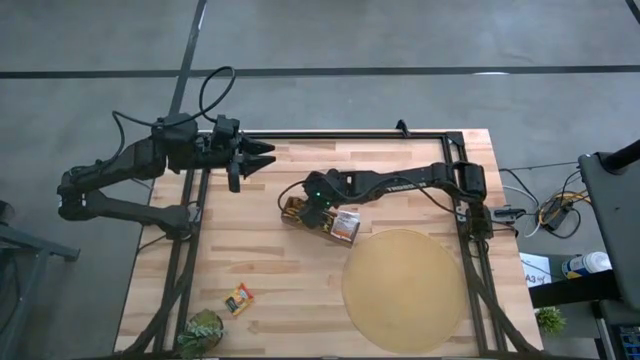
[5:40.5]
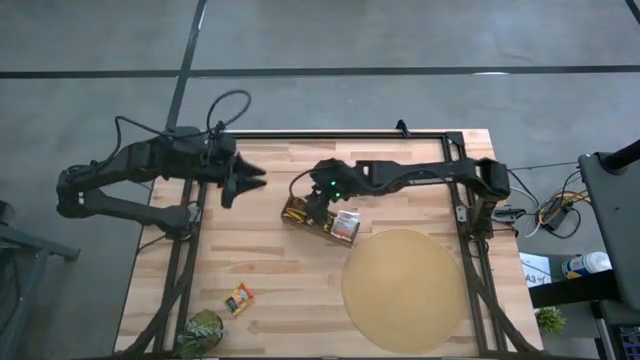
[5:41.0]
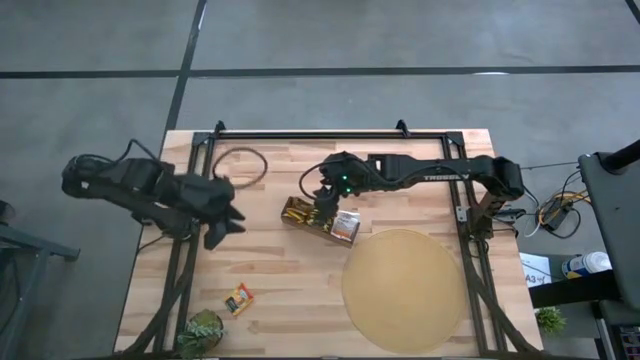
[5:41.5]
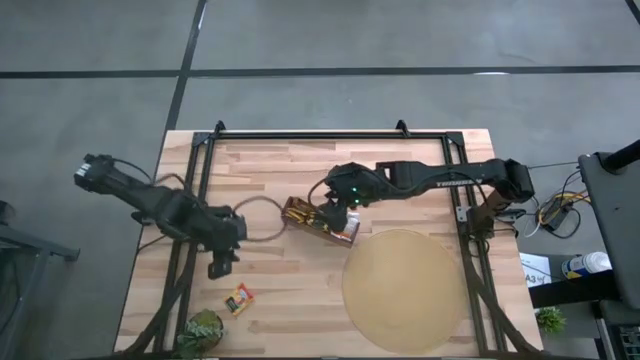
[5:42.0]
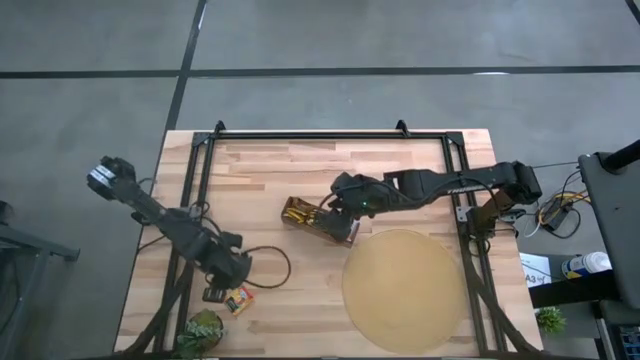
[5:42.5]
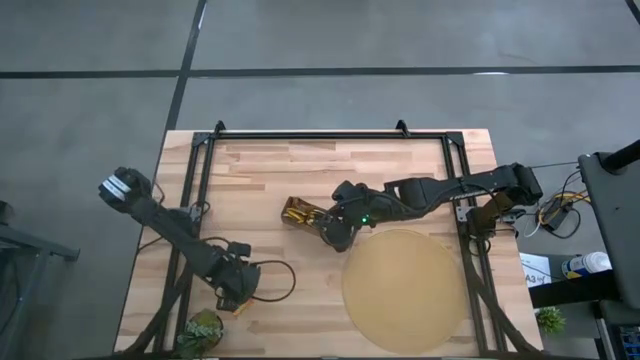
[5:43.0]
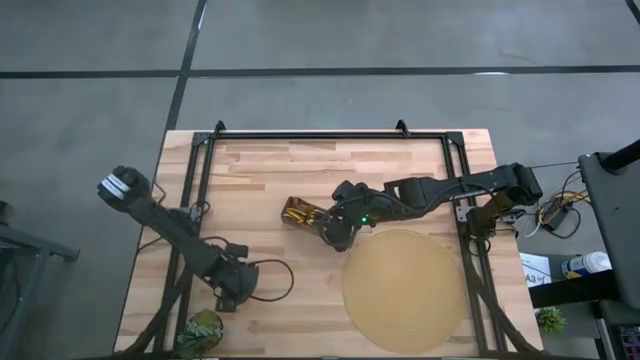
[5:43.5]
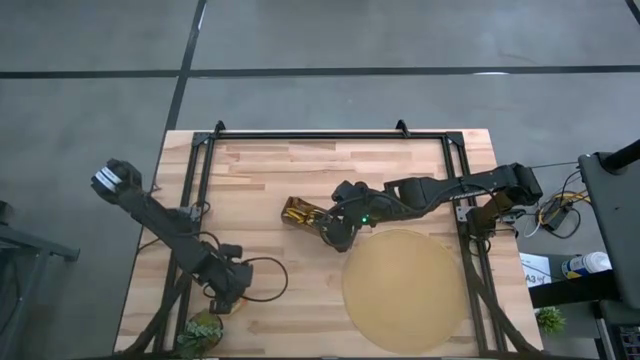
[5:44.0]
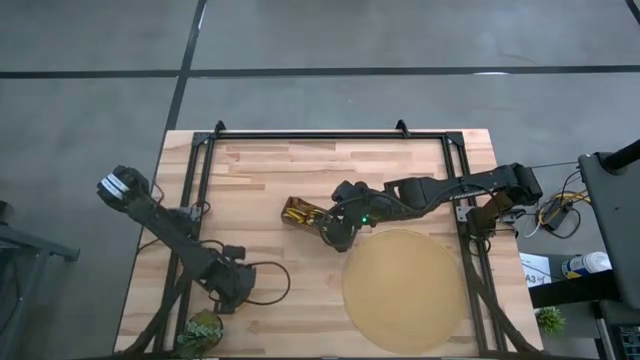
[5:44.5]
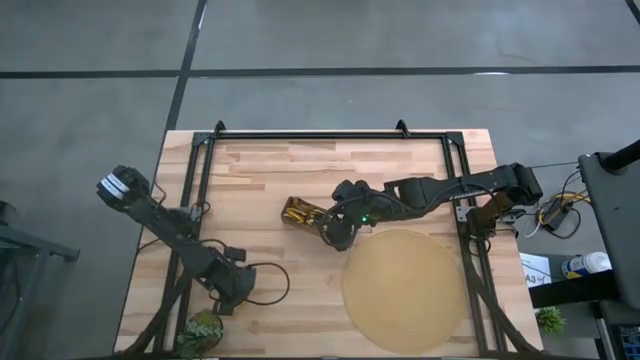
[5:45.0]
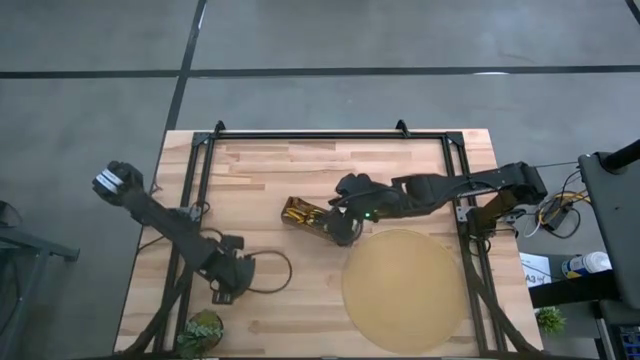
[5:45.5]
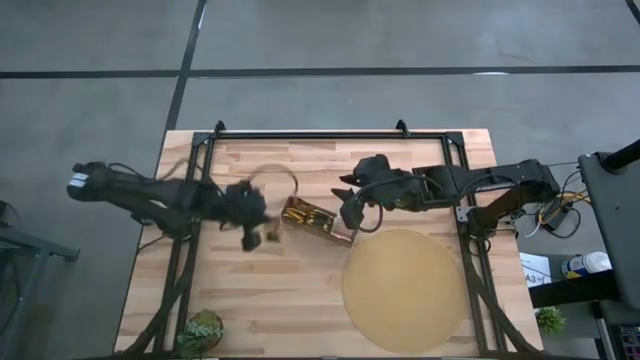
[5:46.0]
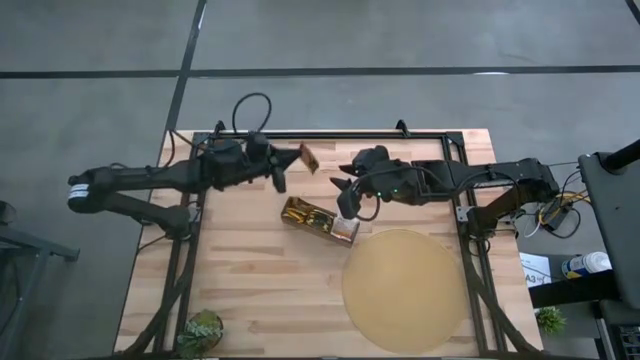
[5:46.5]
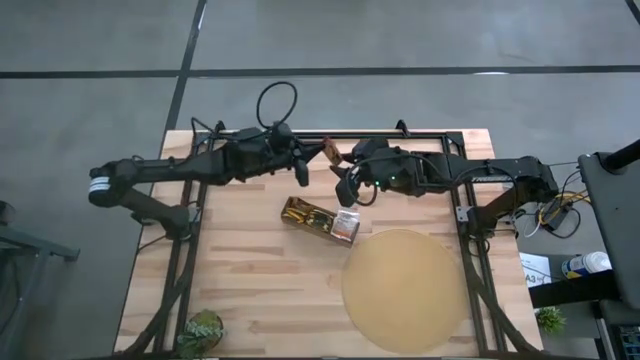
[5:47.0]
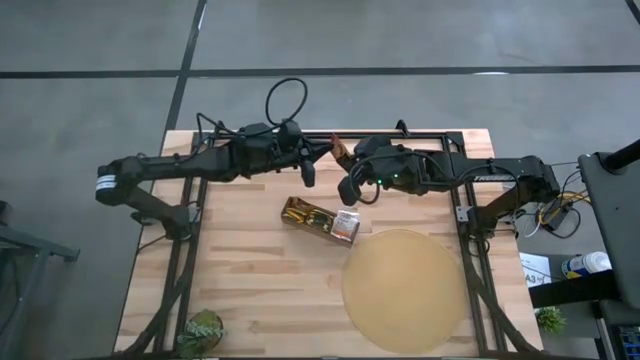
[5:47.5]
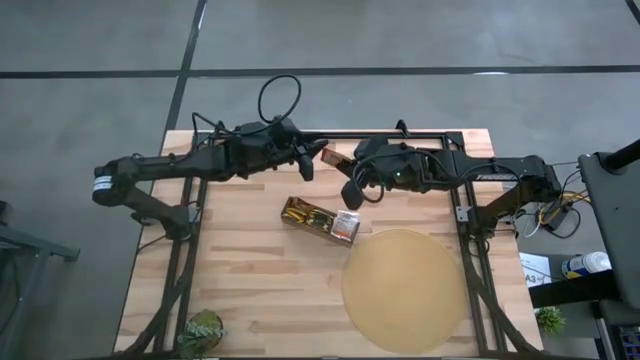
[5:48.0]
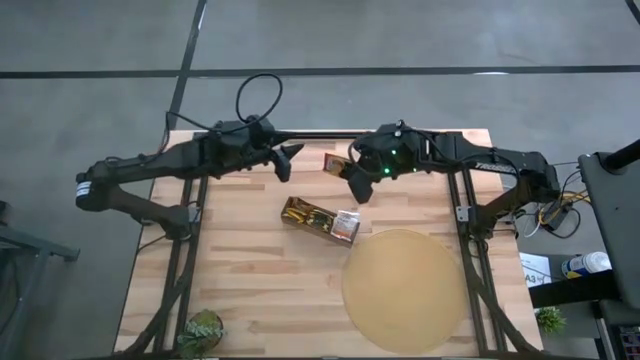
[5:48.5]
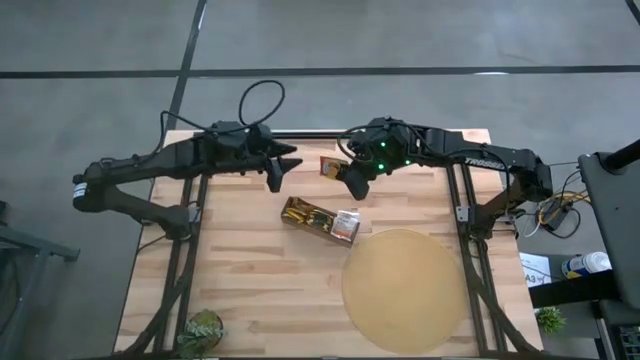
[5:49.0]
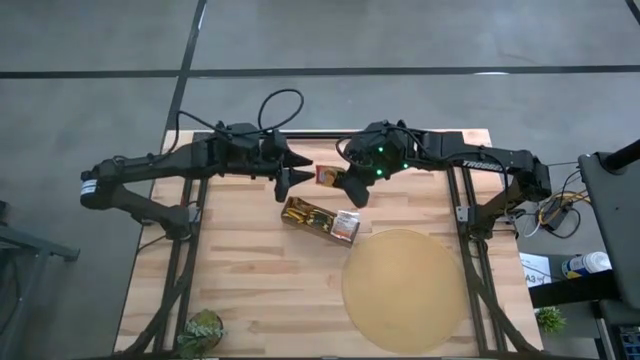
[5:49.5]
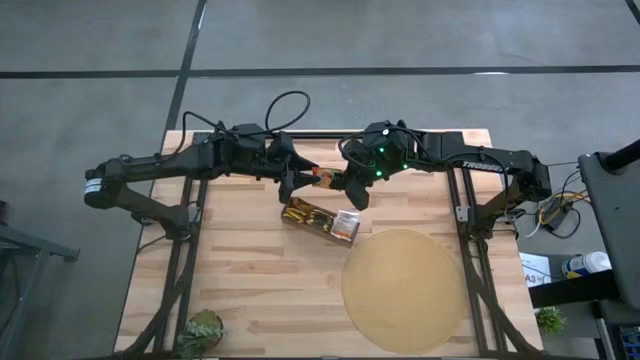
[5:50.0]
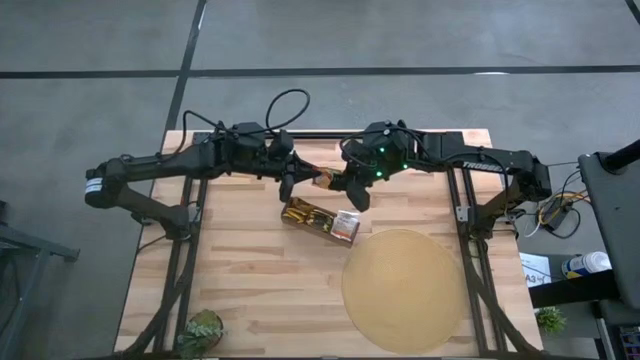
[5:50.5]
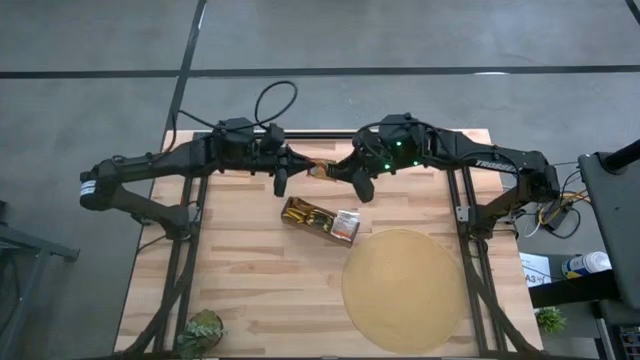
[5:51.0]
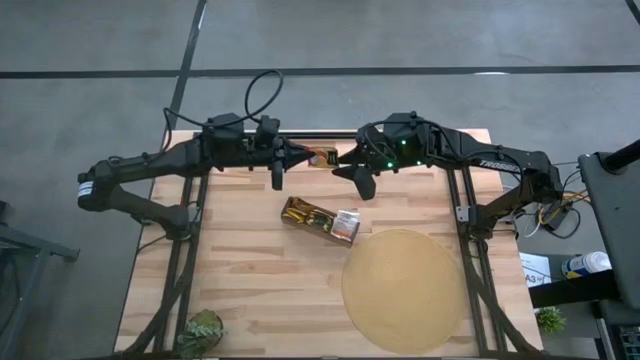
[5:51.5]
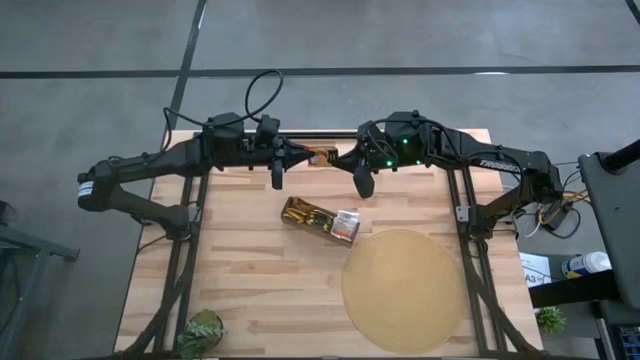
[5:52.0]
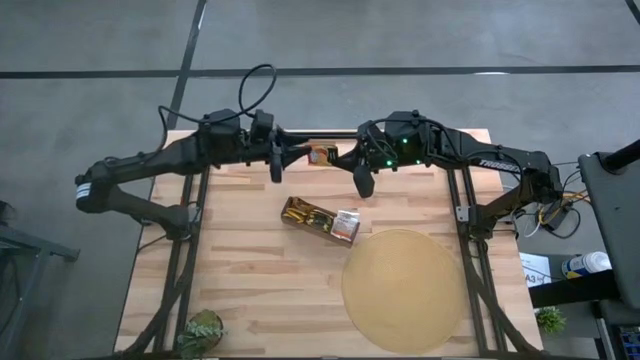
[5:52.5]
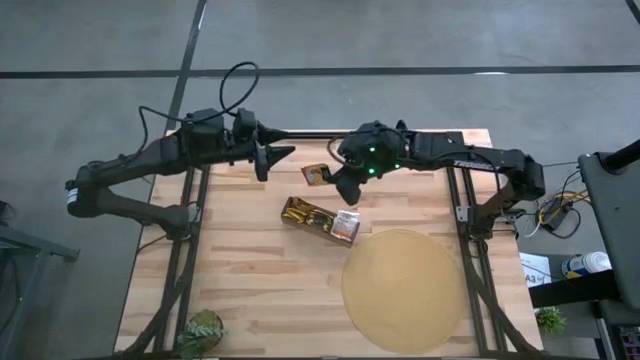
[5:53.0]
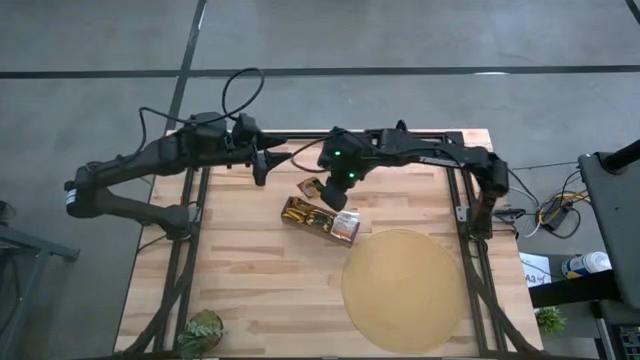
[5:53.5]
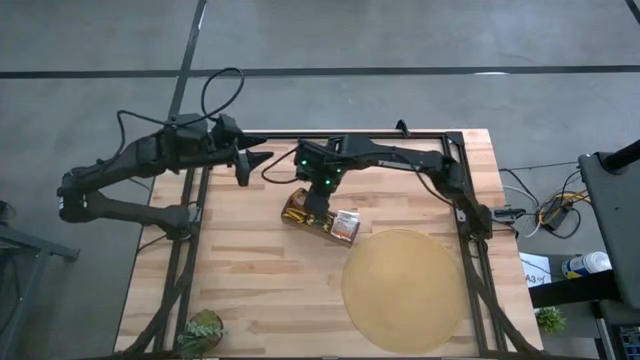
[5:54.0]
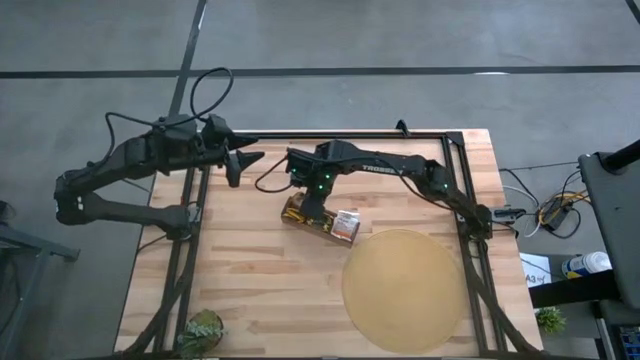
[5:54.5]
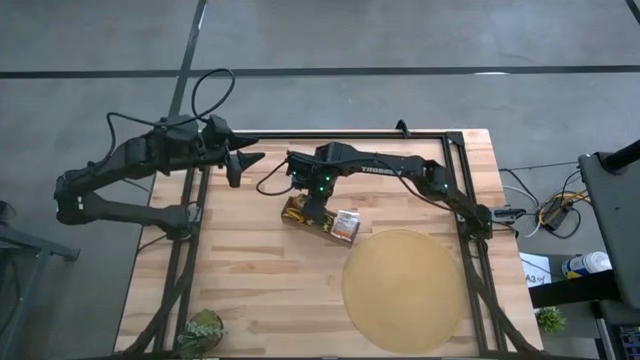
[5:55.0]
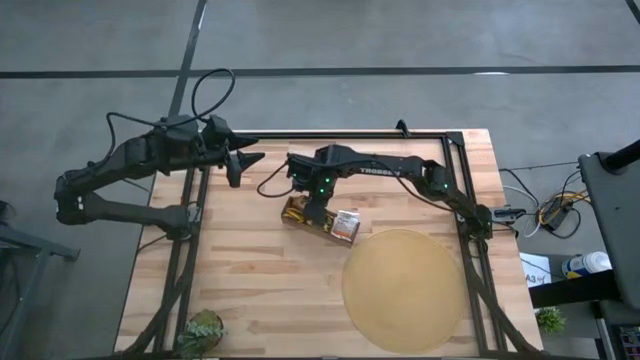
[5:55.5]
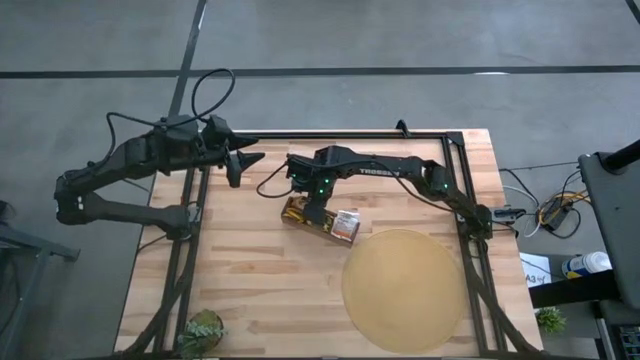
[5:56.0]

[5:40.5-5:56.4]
Task: Pick & Place Tea
Put the orange tea bag into the left section of the wooden organizer

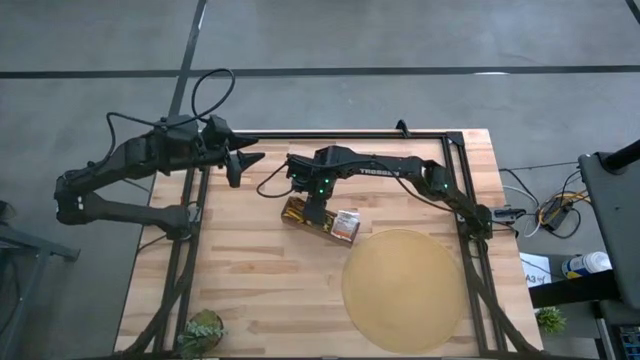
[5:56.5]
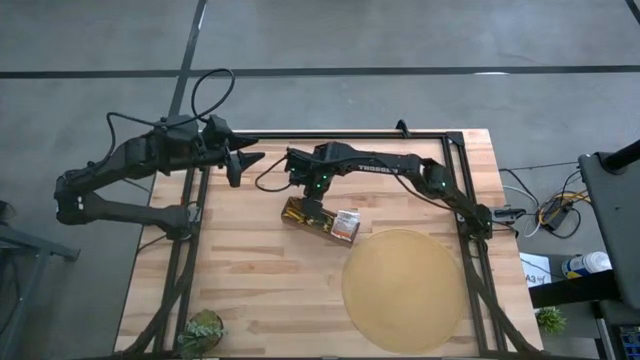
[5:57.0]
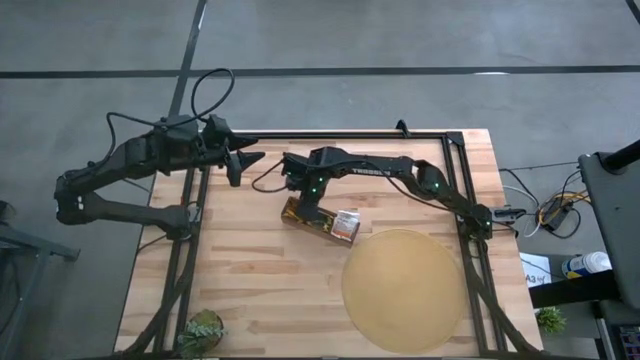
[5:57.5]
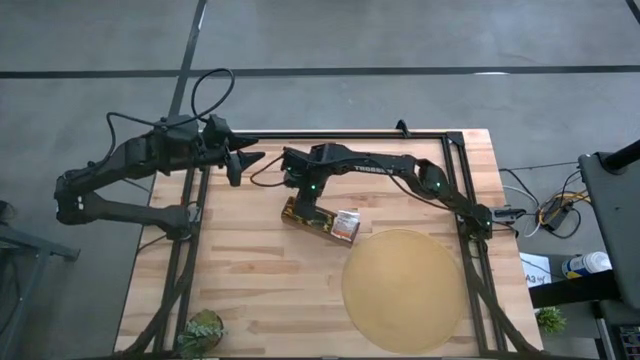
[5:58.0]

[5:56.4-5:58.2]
Adjust the orange tea bags in the wooden organizer

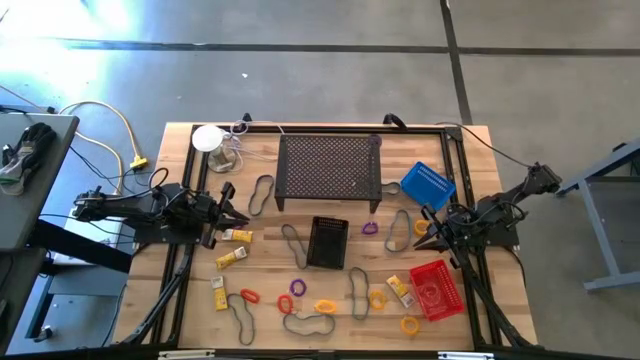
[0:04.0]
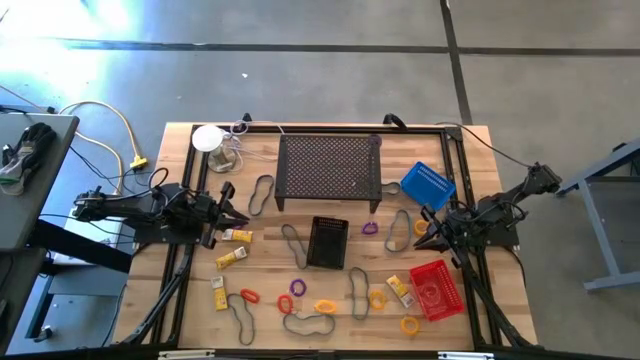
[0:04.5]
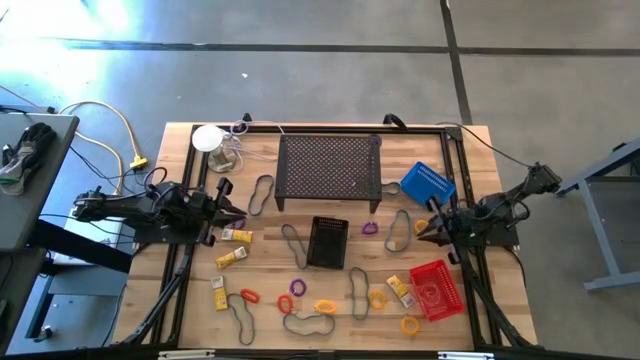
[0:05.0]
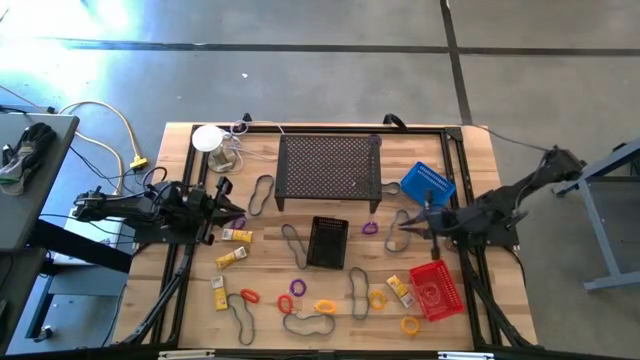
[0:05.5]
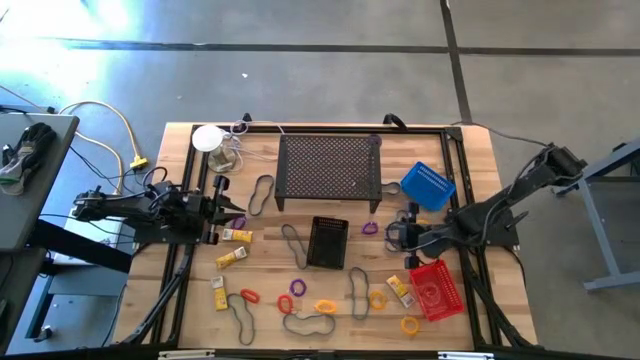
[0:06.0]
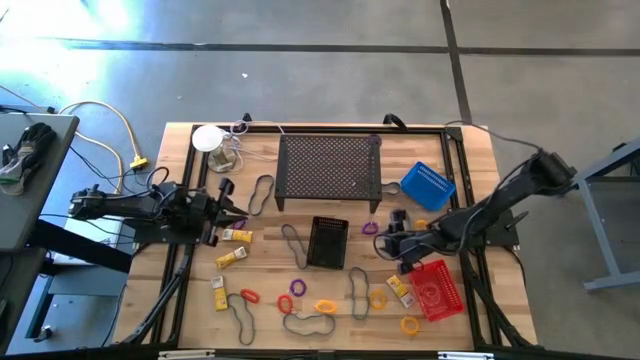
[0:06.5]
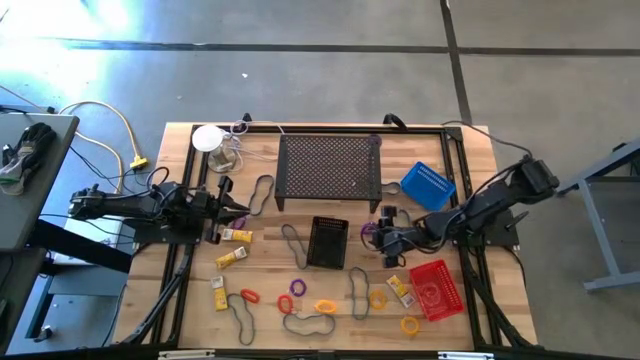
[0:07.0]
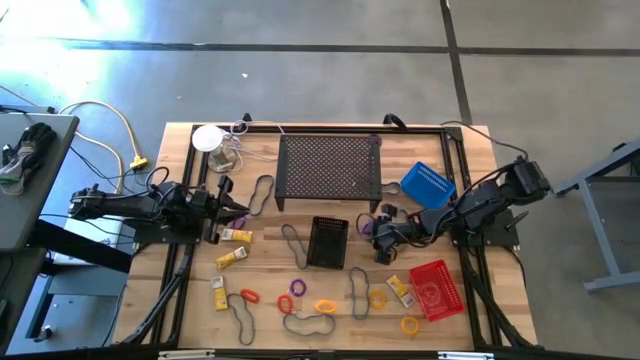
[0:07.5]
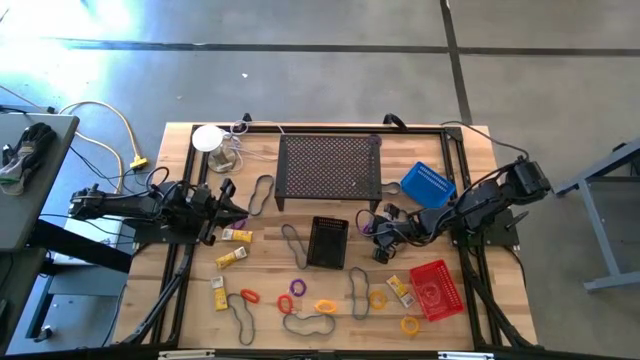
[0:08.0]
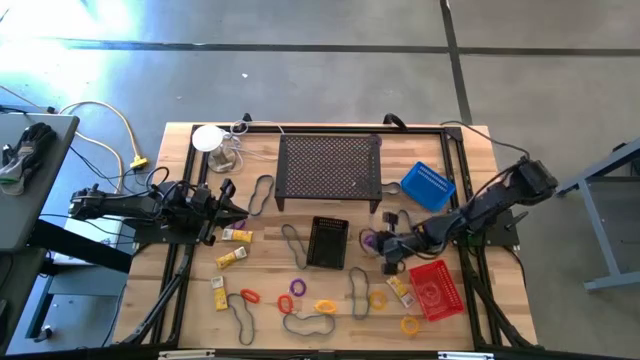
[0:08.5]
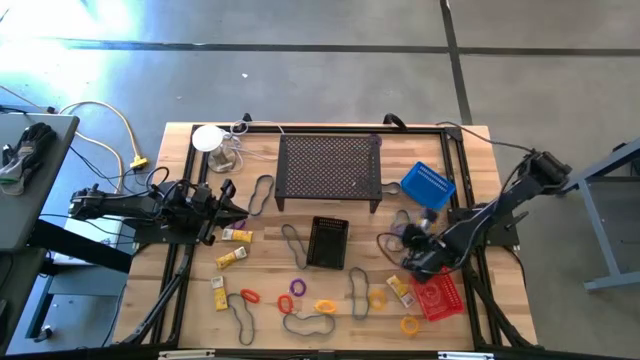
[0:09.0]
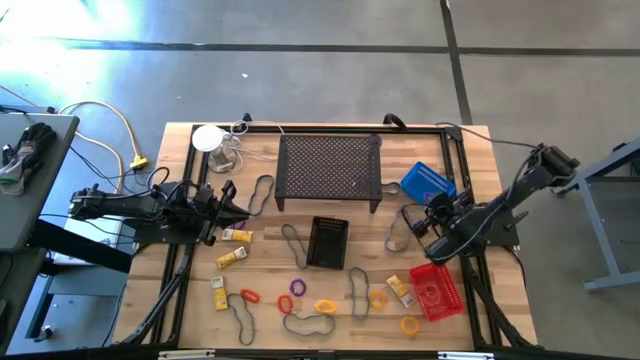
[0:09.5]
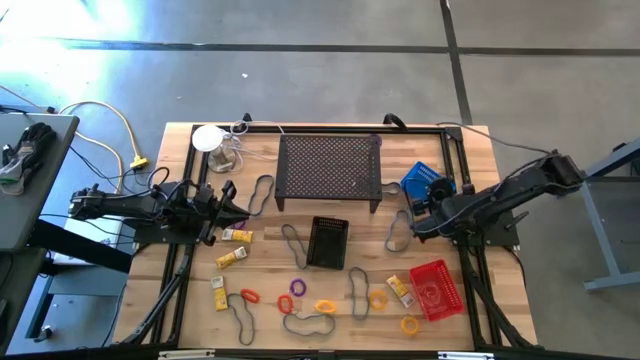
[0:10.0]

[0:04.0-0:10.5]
Task: Pick & Place Office Desk Supplies
Put the purple spring keychain into the blue bin
